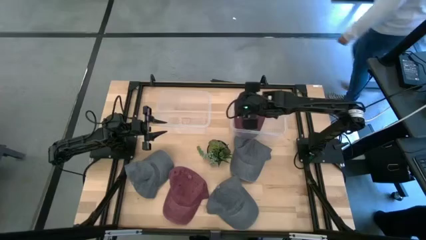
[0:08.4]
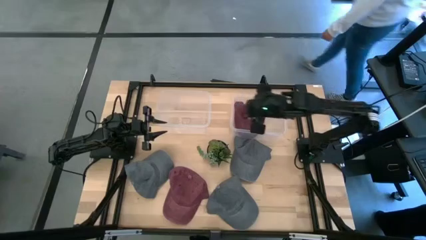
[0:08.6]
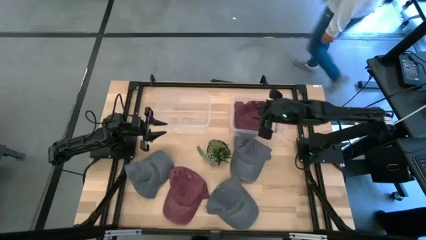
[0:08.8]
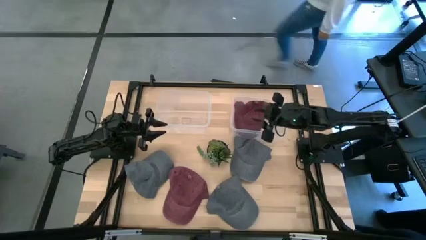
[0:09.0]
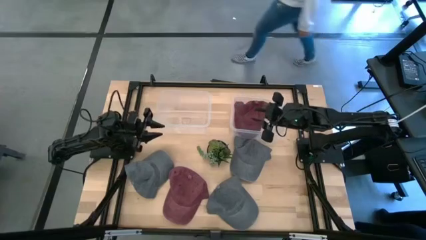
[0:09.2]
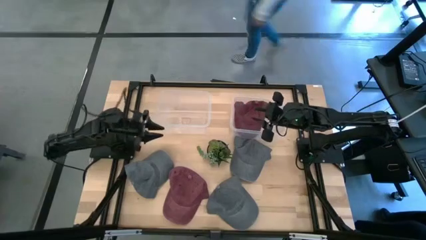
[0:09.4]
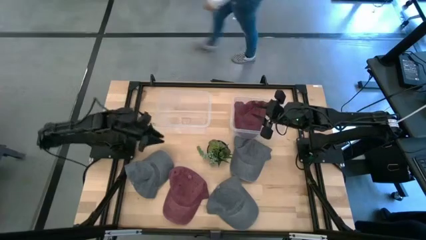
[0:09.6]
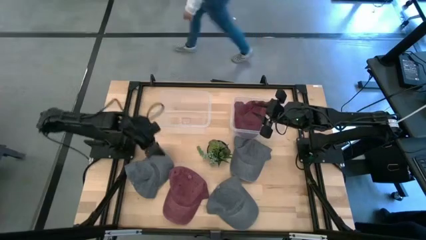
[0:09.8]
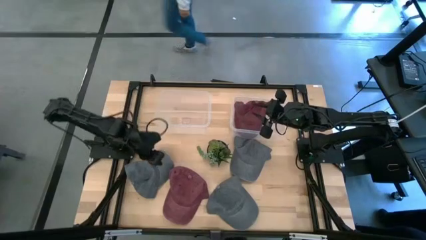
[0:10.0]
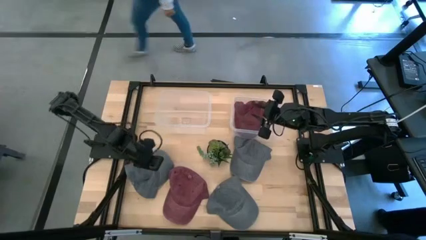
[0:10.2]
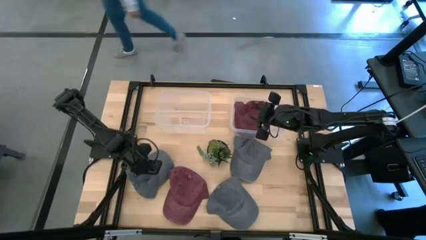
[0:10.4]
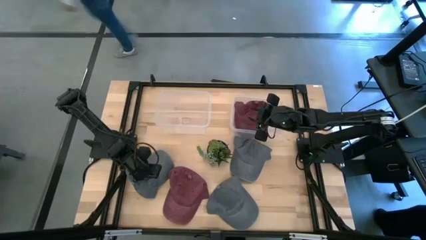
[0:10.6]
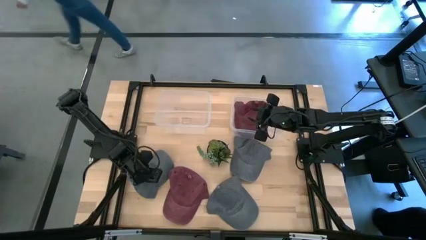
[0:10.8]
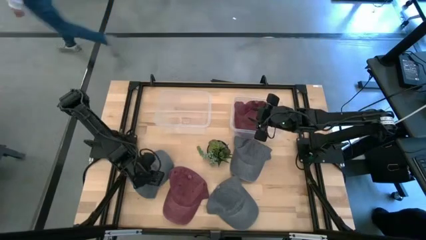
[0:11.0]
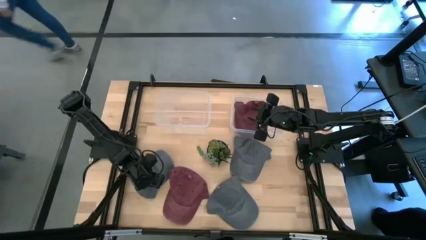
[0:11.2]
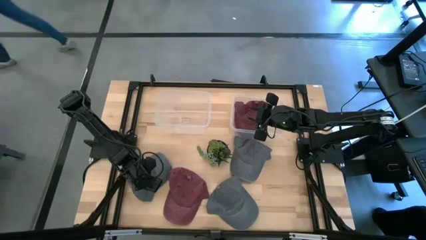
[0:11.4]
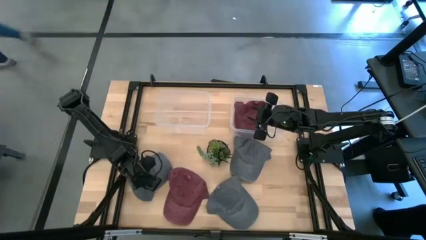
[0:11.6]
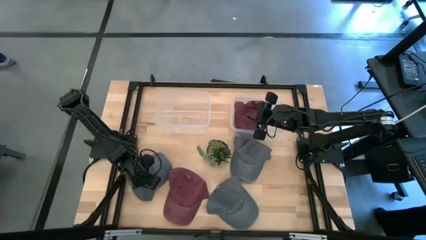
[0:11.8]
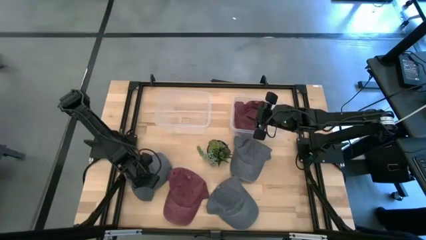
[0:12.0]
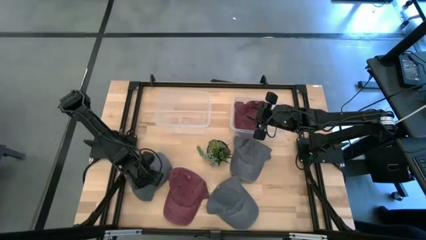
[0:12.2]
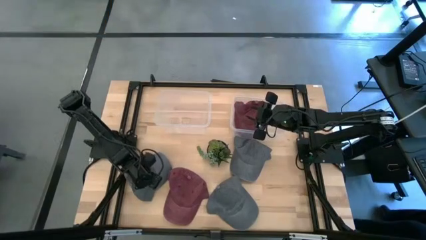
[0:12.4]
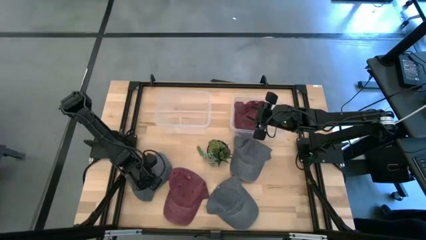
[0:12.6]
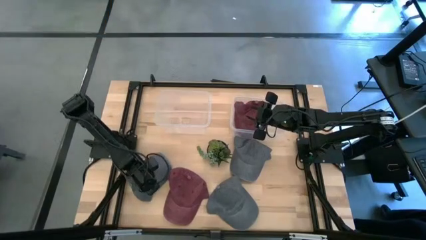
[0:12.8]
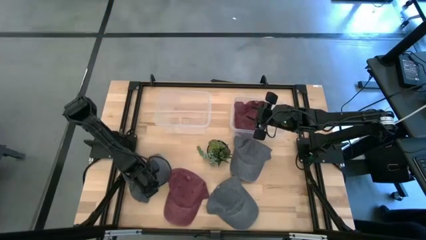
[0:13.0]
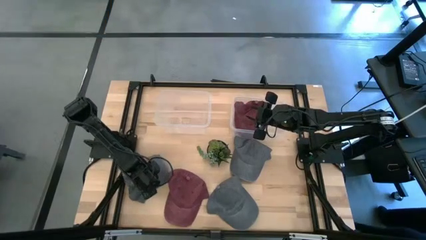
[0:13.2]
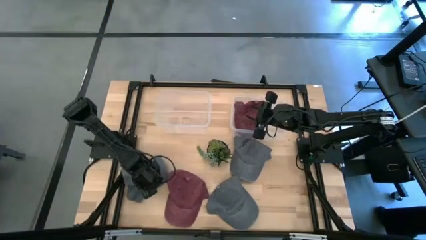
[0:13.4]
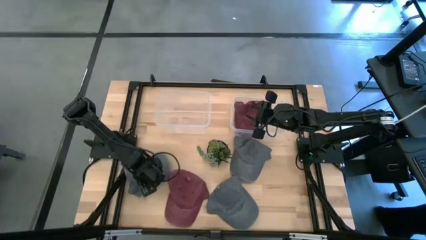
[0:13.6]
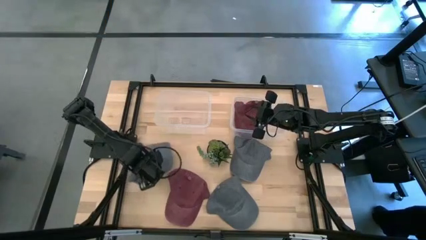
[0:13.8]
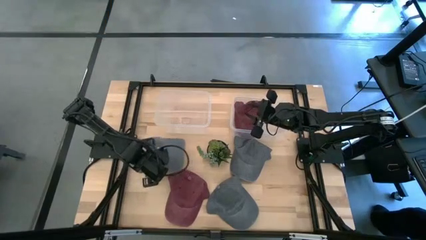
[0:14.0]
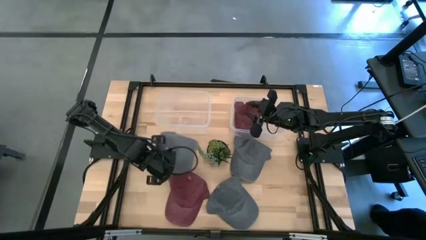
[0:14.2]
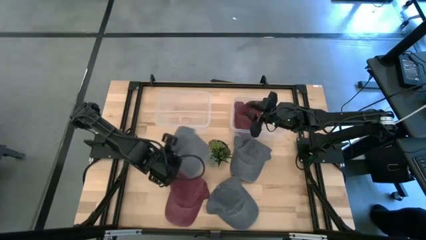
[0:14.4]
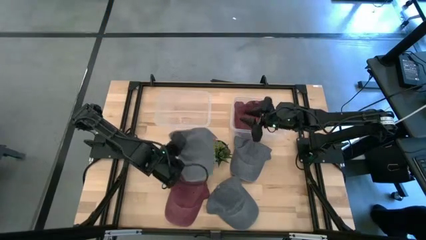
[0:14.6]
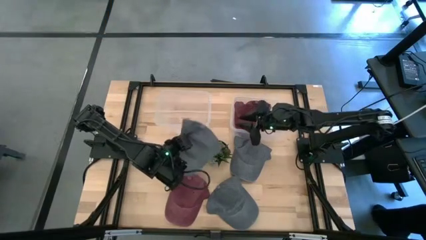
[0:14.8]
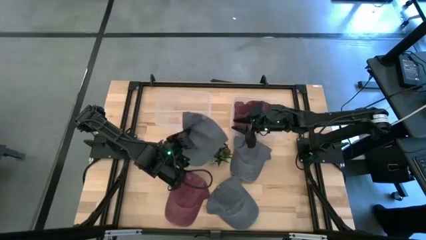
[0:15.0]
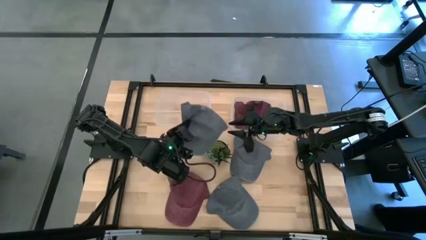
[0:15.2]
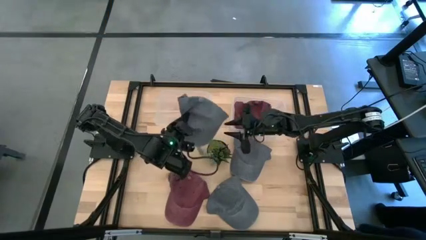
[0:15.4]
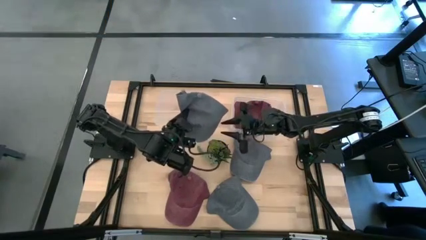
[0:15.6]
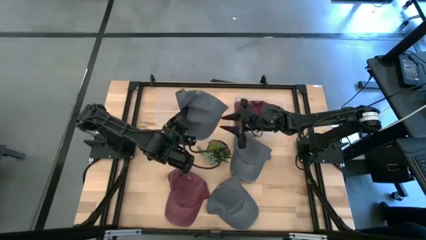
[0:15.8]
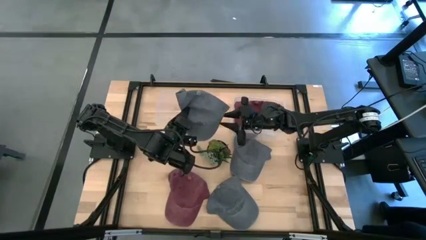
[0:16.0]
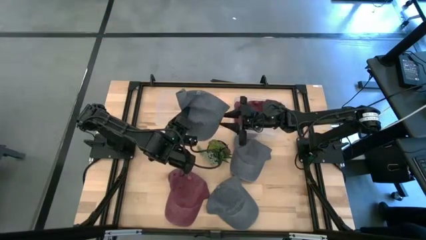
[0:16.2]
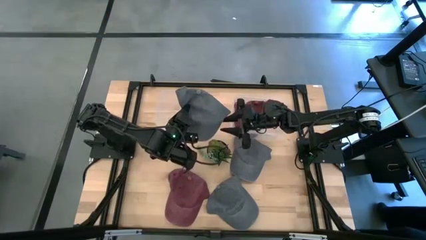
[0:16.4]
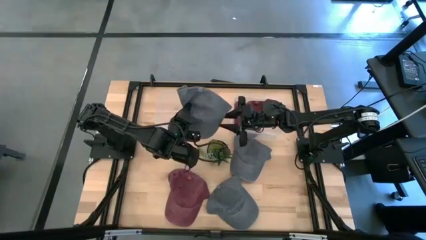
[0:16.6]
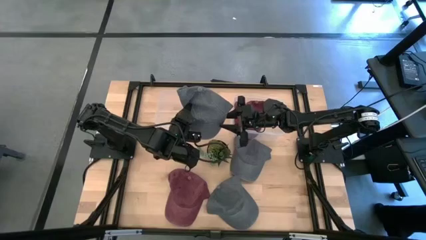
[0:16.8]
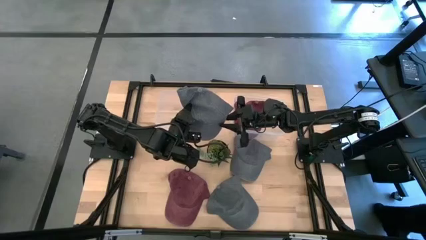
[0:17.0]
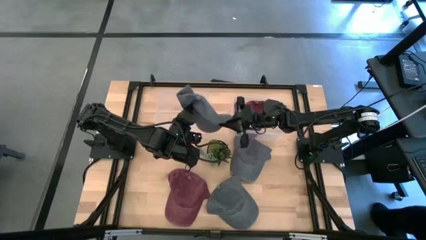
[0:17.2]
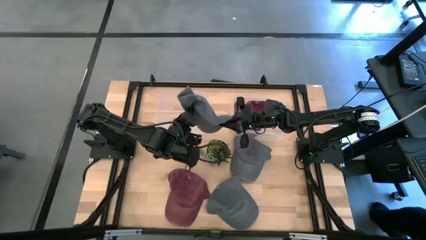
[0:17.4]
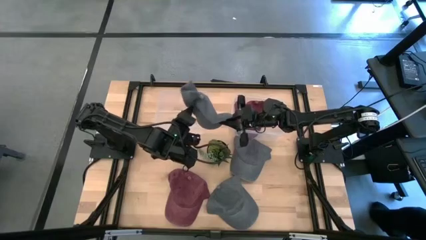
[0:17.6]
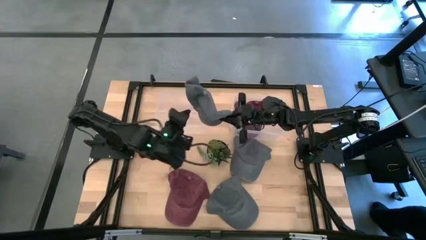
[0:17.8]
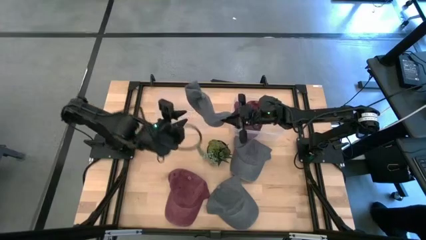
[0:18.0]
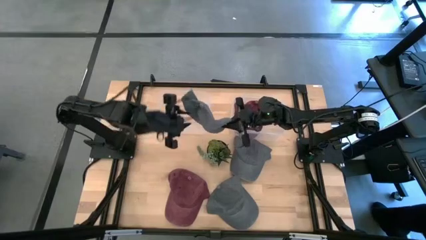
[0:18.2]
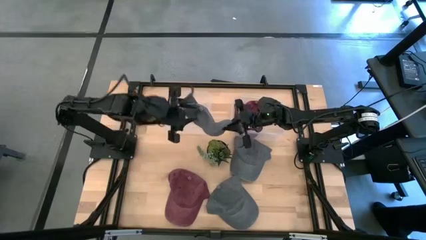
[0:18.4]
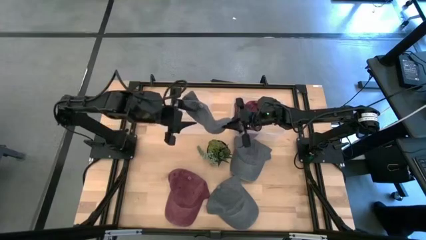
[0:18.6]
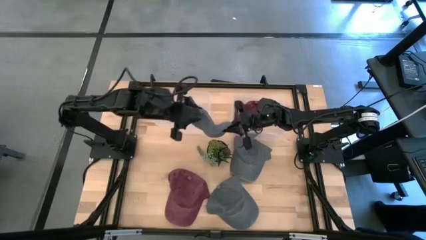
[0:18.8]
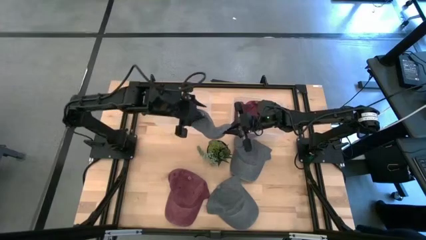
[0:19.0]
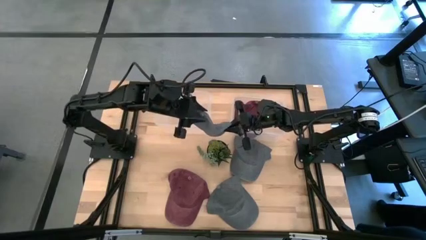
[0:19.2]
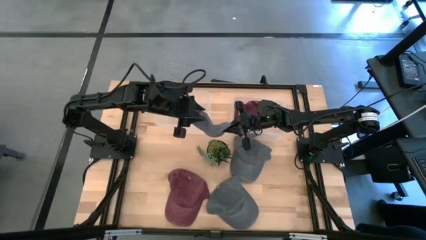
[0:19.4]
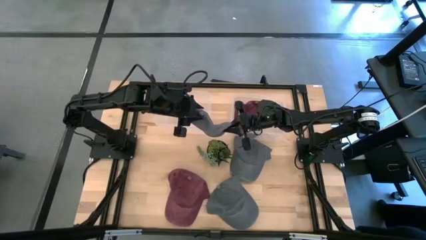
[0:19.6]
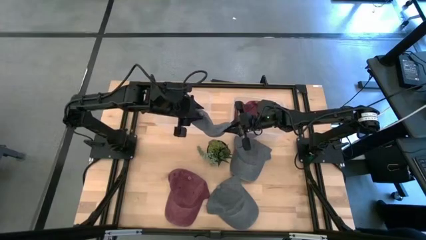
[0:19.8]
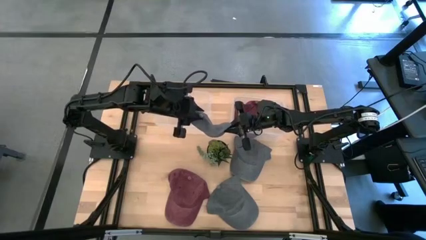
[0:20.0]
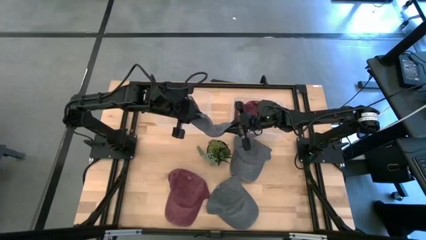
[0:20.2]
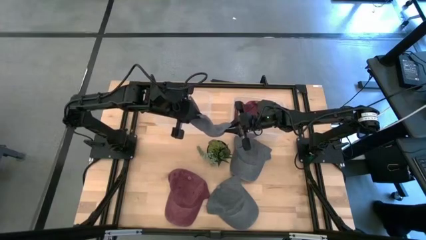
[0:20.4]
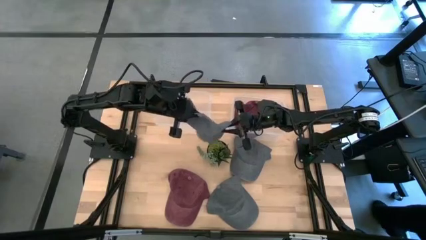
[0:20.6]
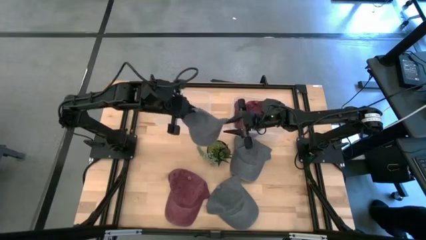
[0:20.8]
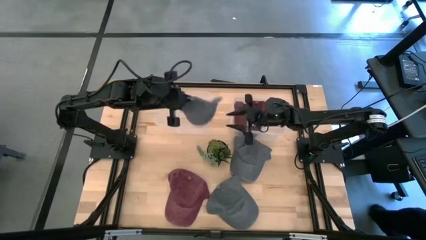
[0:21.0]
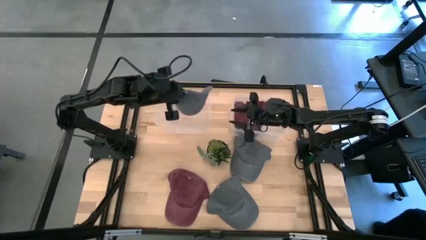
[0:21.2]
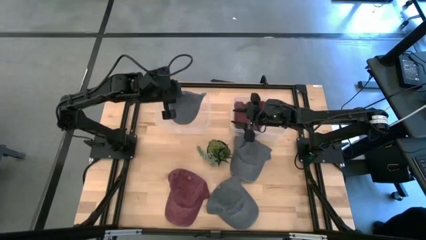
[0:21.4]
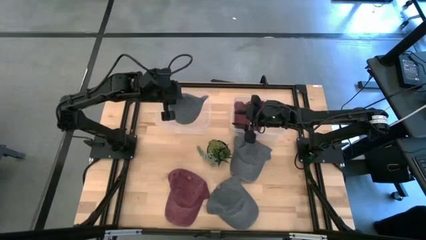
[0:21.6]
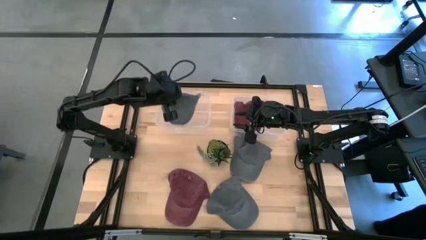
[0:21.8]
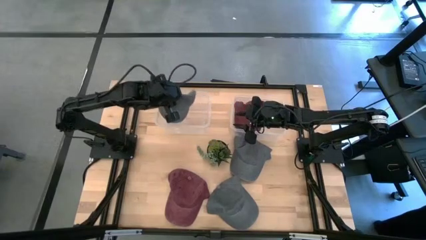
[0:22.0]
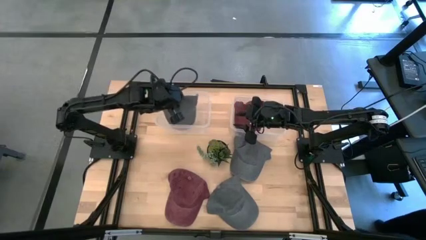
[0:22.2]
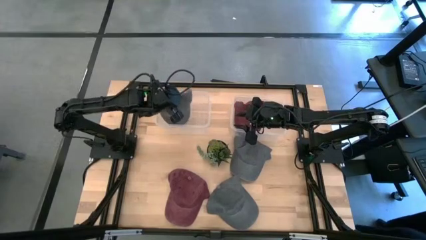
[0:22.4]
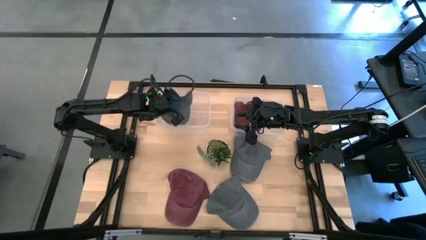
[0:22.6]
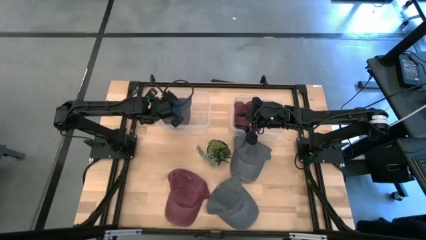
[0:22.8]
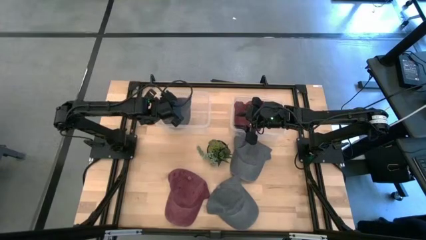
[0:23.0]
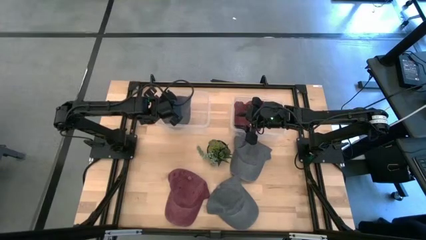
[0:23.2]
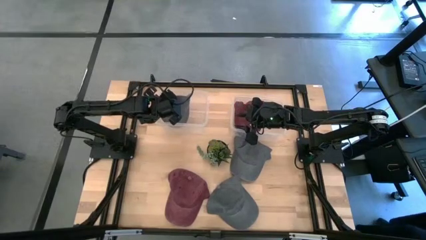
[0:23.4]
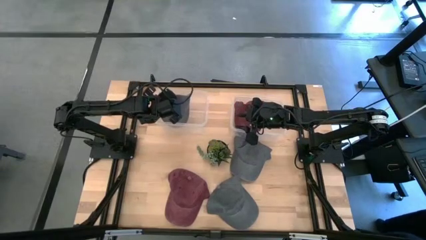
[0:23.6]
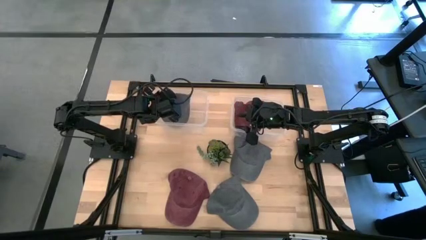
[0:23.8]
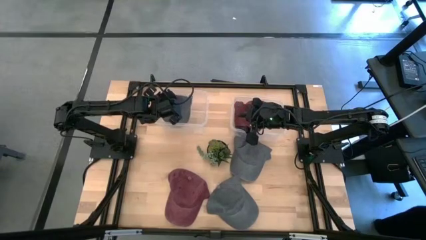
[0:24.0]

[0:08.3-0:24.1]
Task: Pick & Place hat
Put the left gray cap into the left transparent bin
